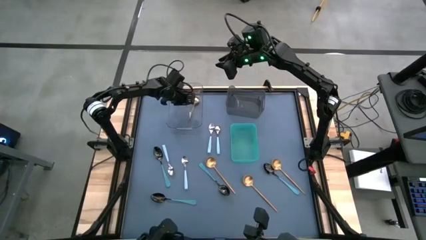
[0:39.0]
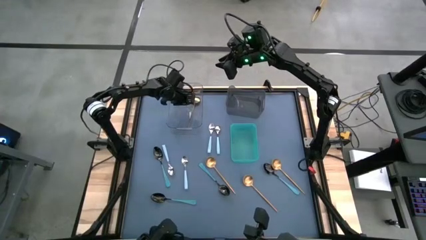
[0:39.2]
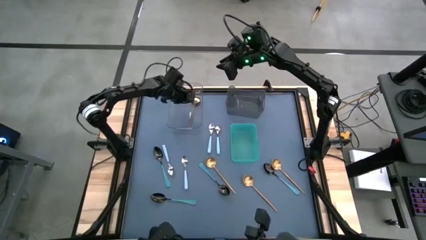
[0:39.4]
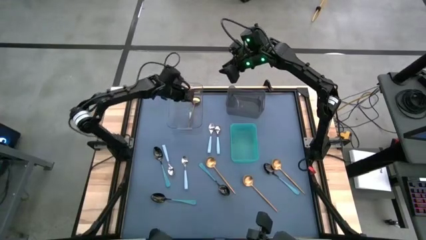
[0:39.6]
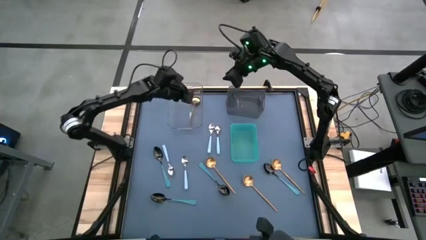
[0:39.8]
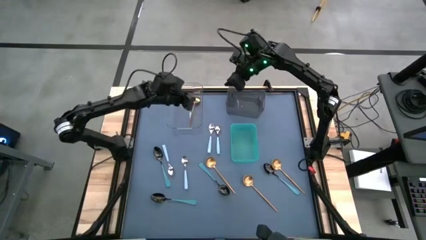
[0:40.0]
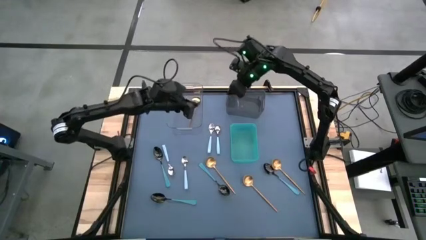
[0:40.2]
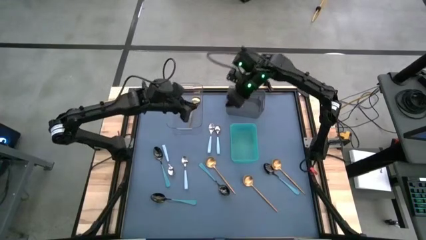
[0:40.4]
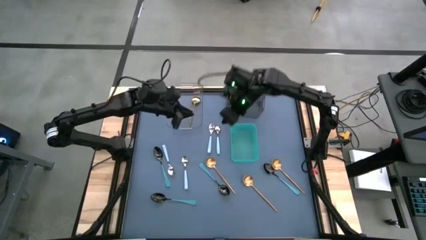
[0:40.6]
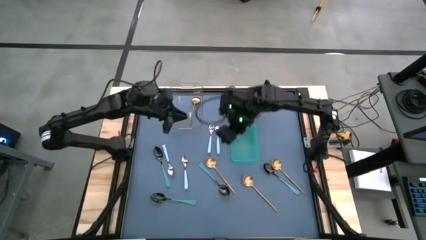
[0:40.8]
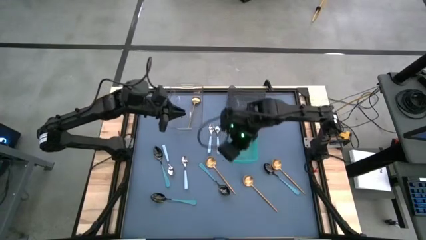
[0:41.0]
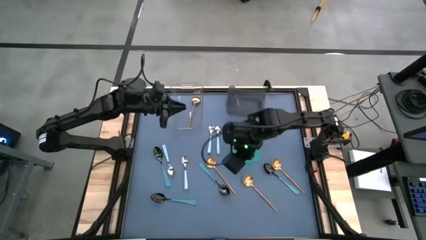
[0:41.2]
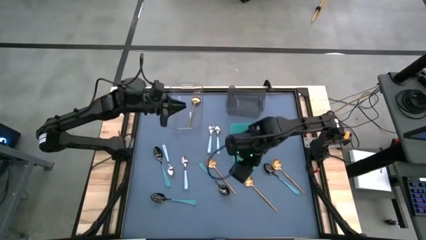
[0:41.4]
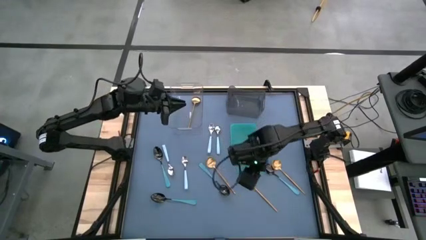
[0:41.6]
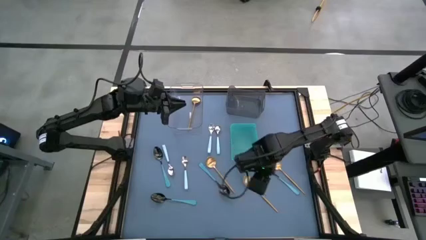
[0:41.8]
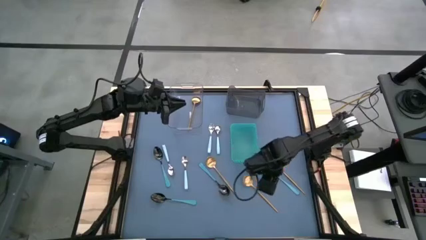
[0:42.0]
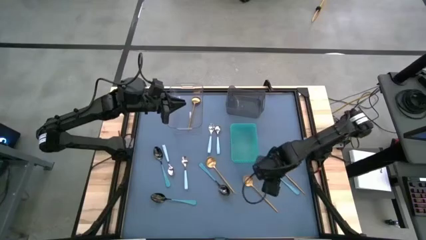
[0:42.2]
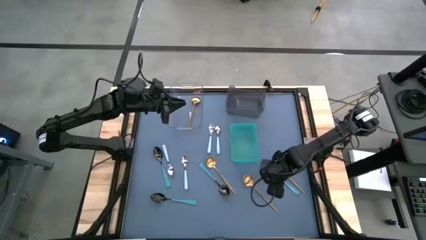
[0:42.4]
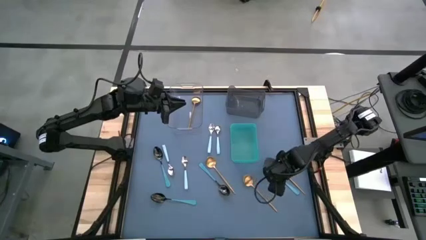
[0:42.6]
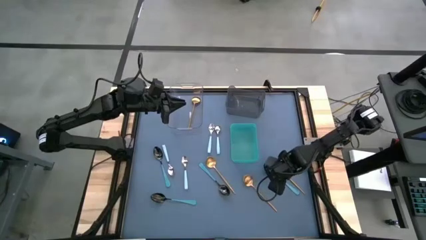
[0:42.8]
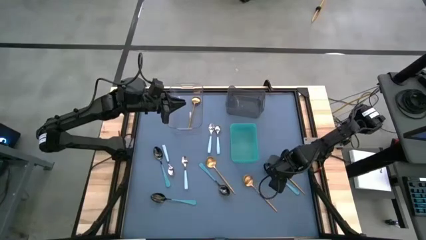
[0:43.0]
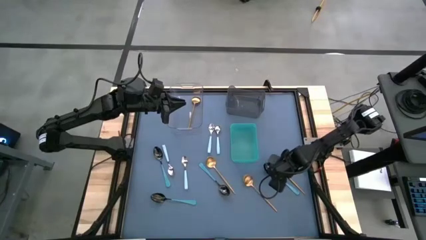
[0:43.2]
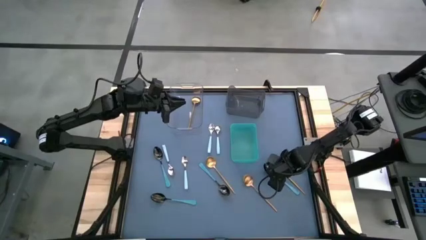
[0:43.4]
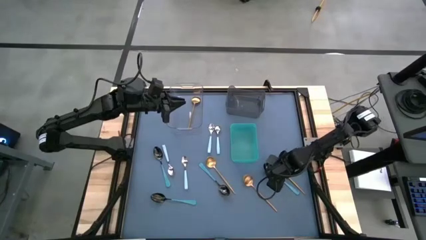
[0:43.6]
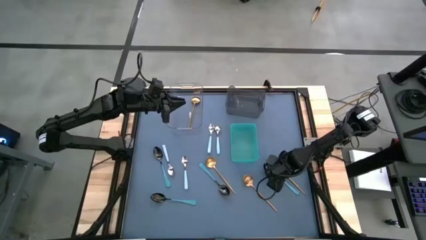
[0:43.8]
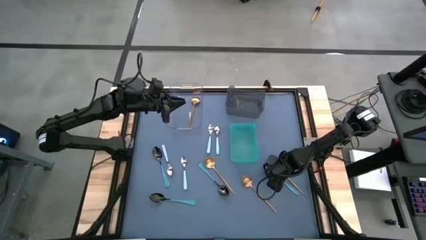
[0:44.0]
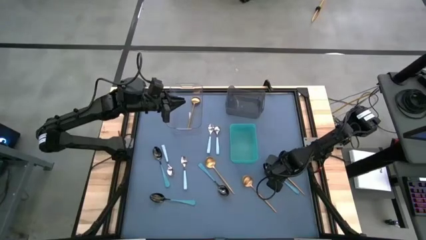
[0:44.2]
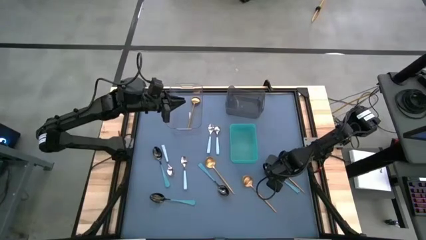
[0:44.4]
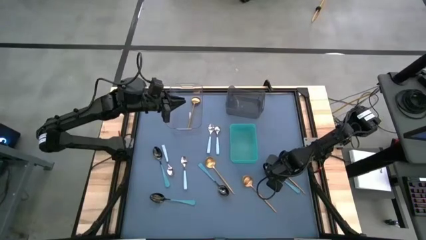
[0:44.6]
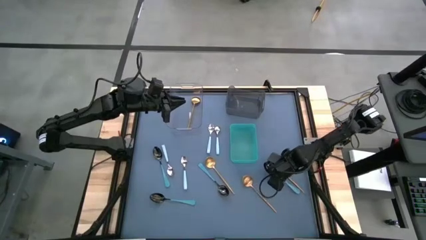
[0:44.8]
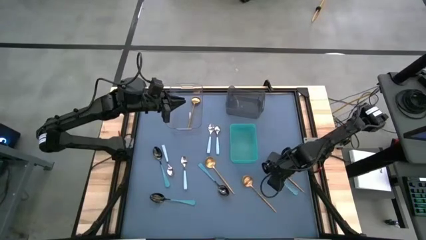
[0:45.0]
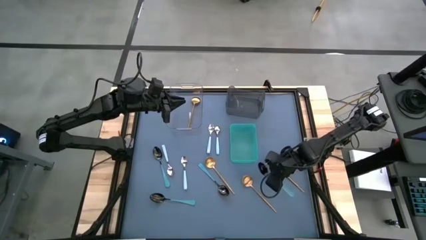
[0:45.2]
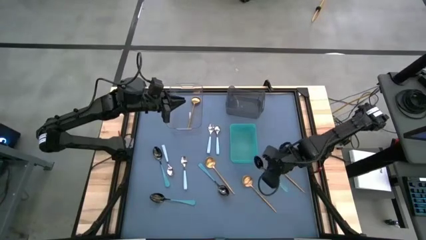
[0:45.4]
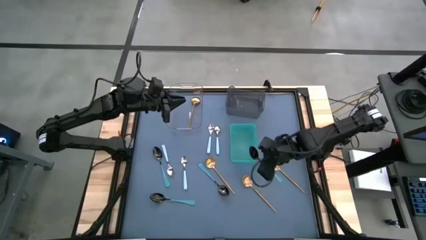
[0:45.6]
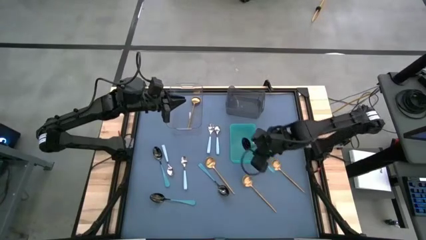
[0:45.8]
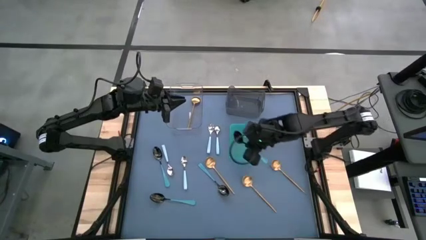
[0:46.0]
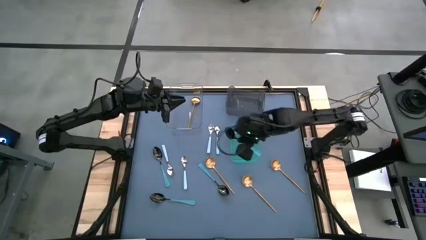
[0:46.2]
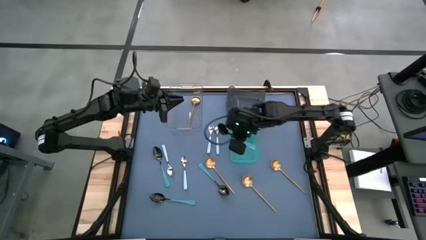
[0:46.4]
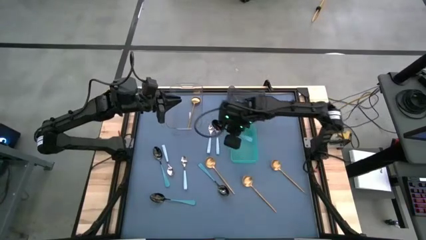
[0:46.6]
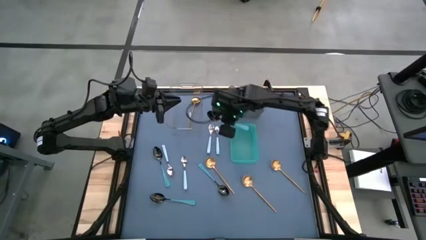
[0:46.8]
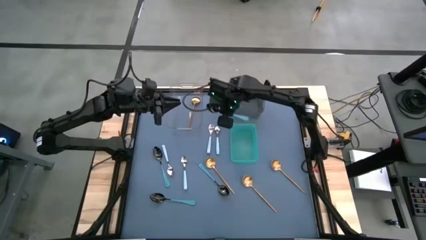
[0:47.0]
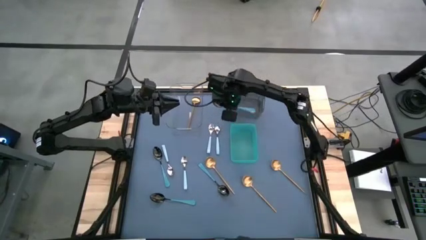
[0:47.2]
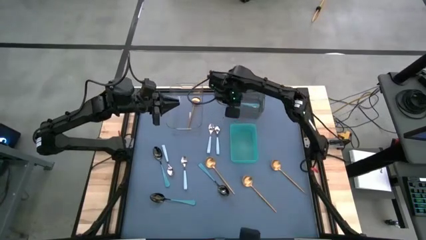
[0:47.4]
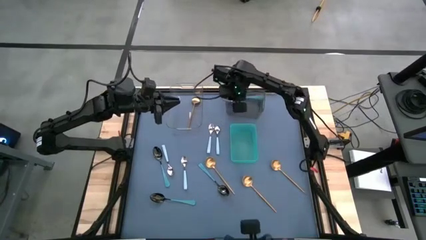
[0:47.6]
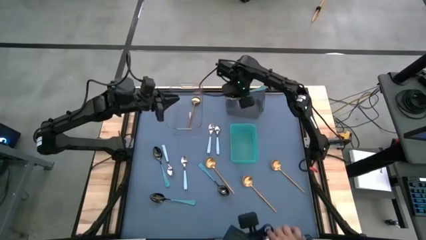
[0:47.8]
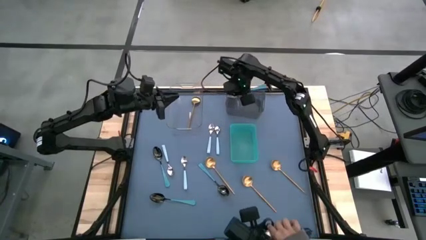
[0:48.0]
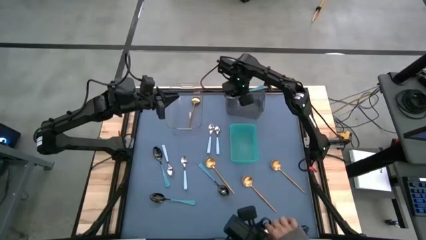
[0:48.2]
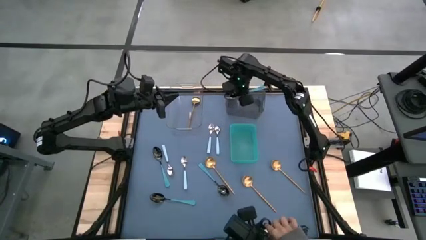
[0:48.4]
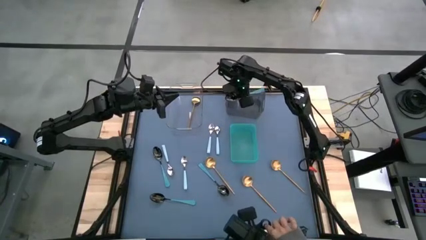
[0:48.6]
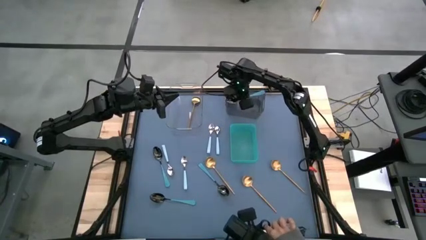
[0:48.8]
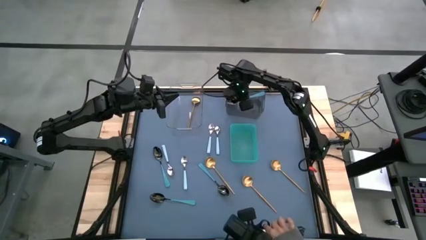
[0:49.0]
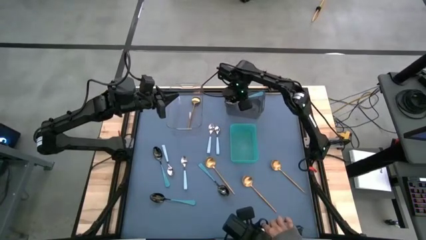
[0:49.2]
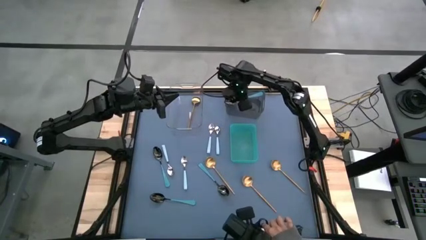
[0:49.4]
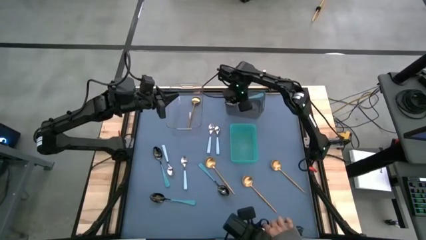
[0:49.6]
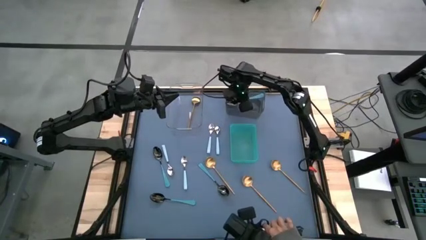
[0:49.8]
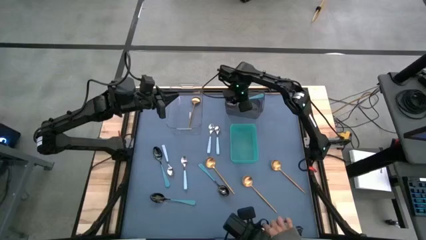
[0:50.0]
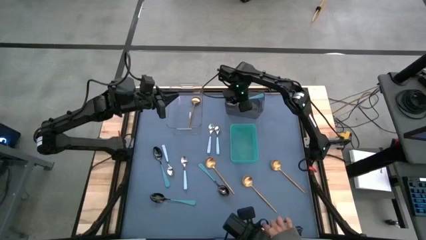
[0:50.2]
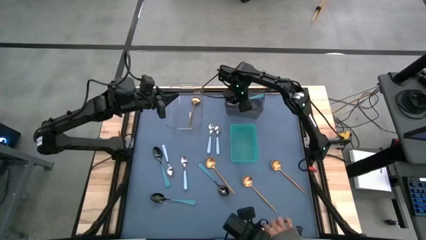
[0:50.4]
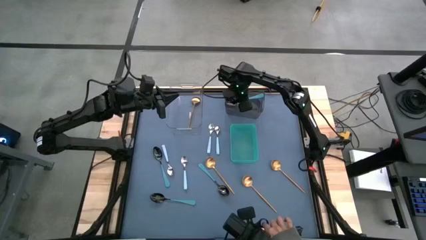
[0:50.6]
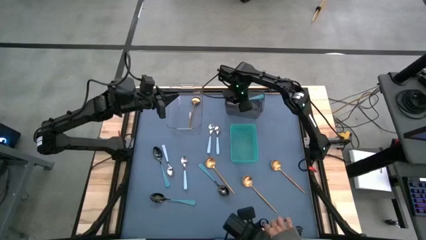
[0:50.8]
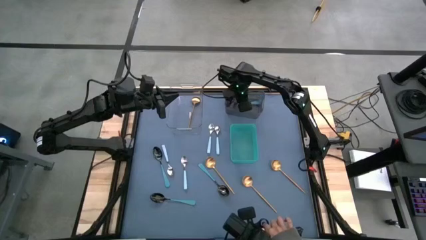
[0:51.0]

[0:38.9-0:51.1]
Task: Sort silverware by color (type)
Put the blue spoon into the black bin
